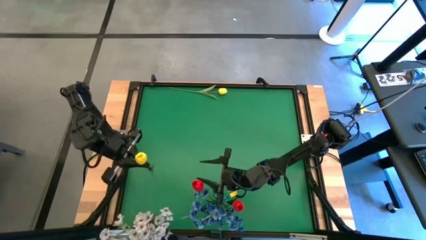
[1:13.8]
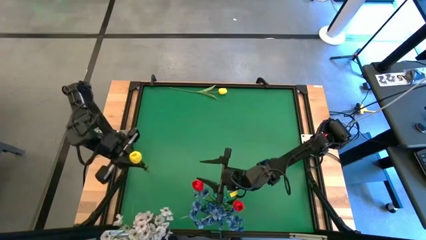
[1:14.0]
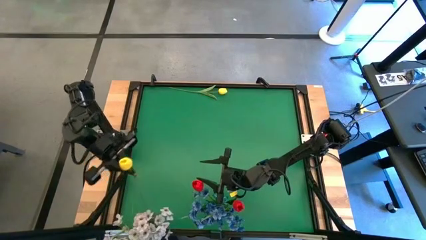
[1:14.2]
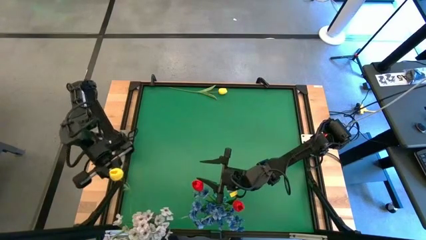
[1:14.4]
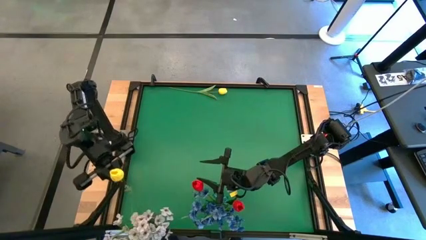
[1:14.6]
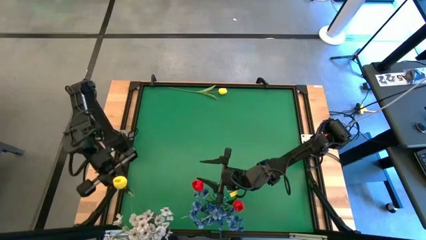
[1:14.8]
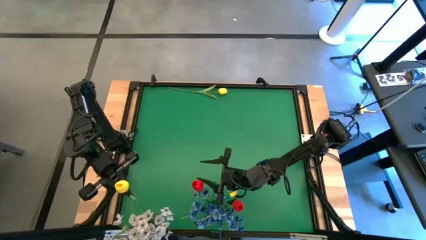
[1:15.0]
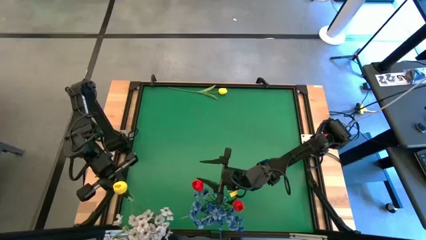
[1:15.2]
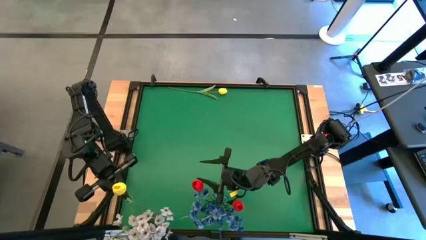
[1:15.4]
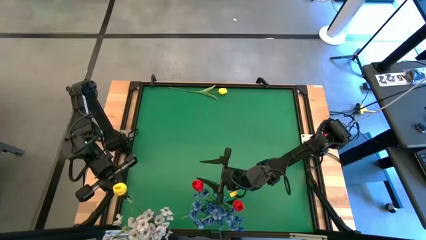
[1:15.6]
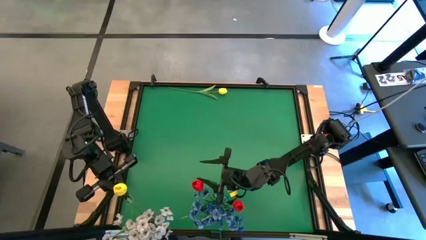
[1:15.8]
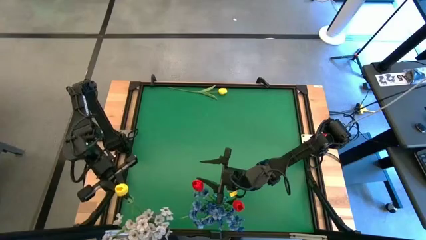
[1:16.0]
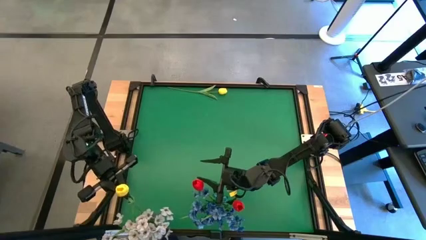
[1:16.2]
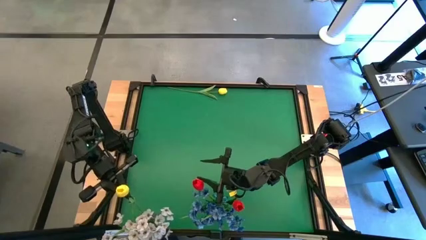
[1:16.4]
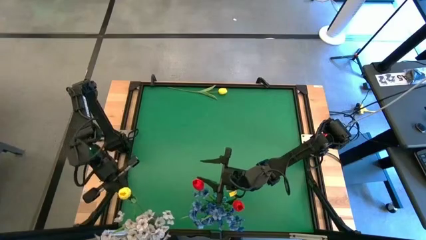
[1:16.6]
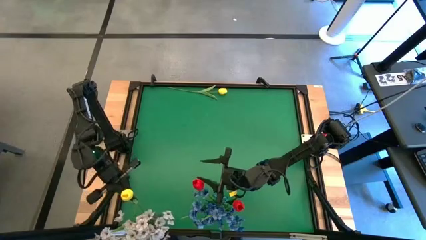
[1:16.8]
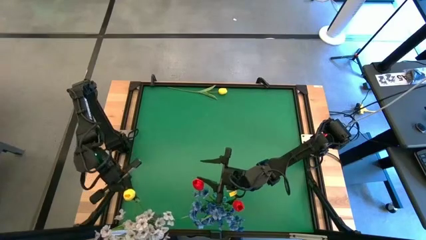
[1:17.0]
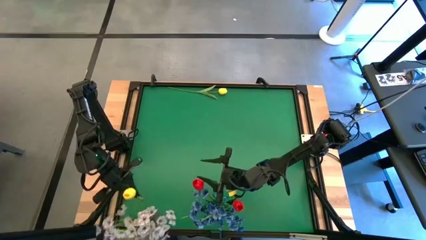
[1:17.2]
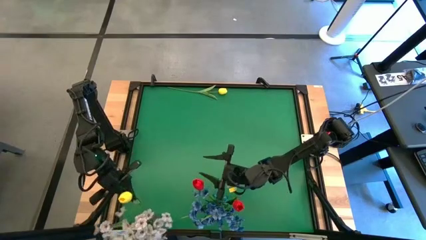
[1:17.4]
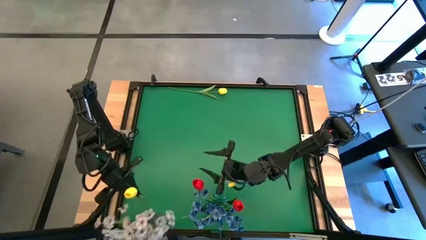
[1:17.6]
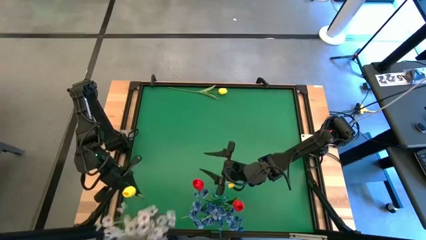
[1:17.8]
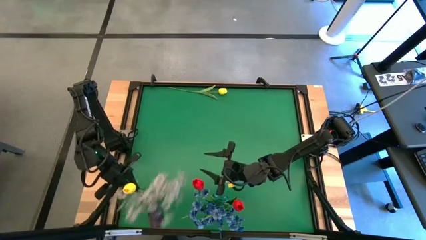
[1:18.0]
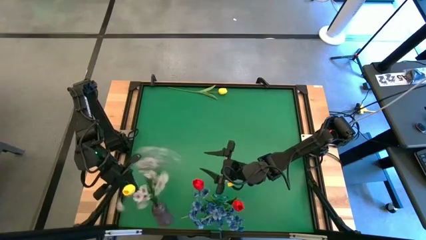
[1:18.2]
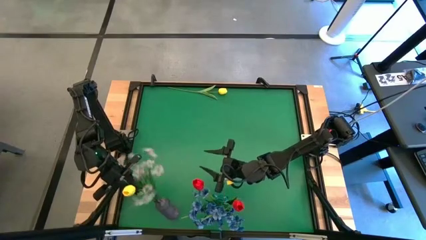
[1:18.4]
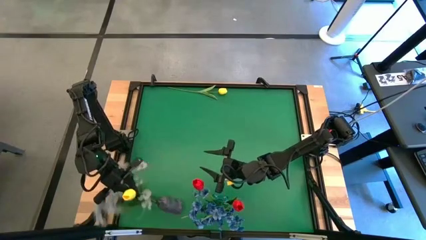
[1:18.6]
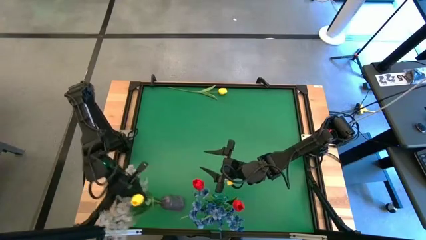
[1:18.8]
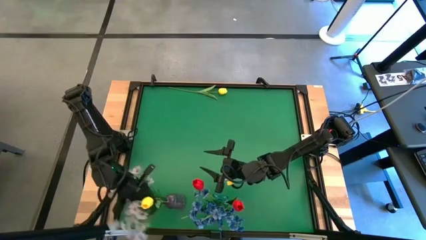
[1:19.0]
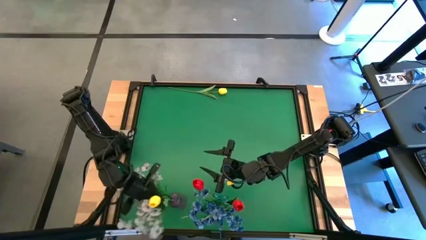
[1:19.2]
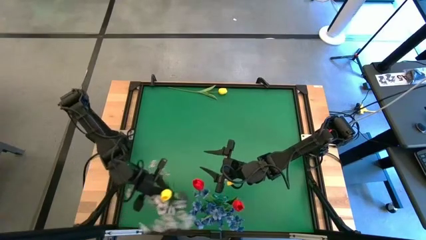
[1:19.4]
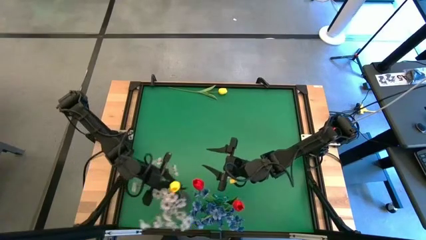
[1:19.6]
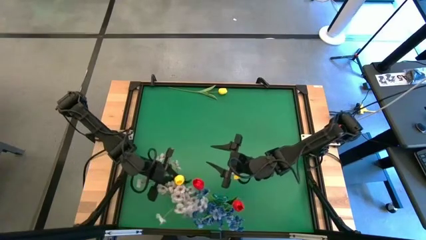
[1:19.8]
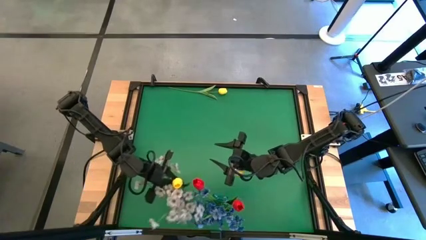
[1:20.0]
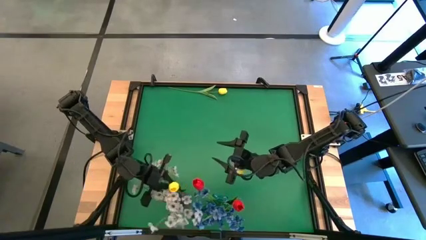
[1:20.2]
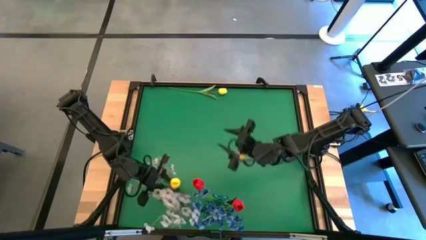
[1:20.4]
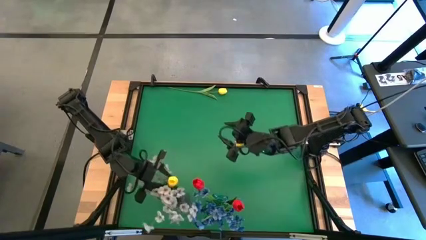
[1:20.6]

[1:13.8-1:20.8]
Task: Sort flowers into vase by color
Put the bottom yellow flower into the purple vase

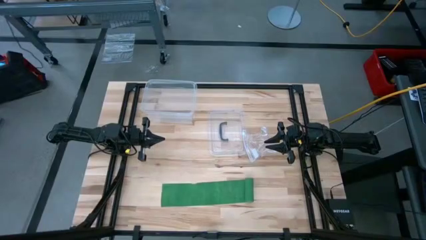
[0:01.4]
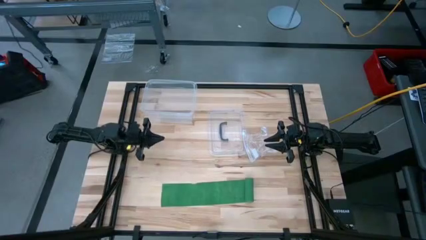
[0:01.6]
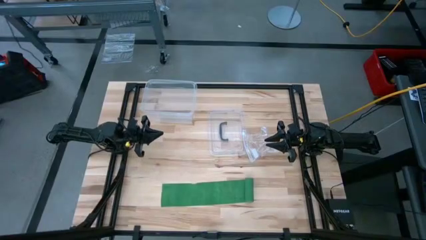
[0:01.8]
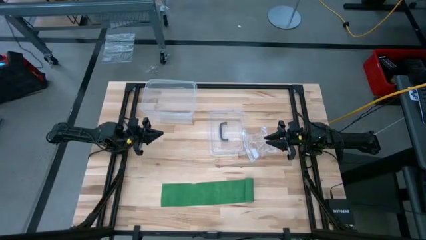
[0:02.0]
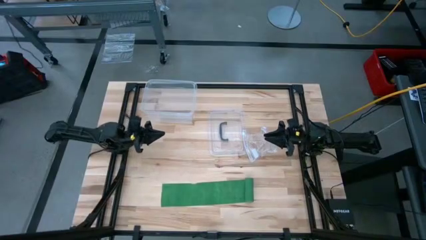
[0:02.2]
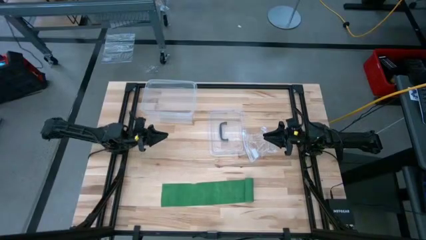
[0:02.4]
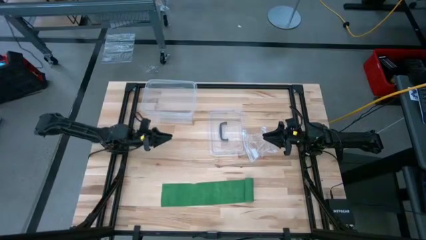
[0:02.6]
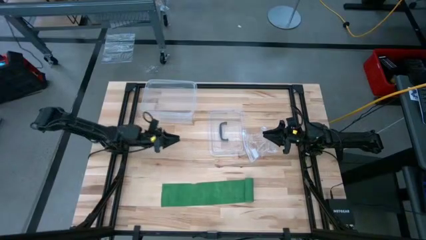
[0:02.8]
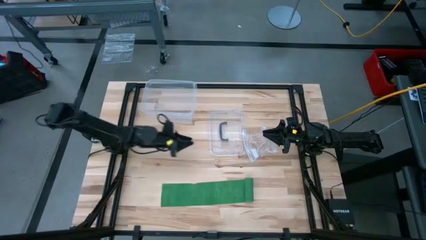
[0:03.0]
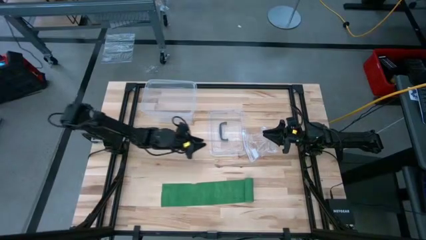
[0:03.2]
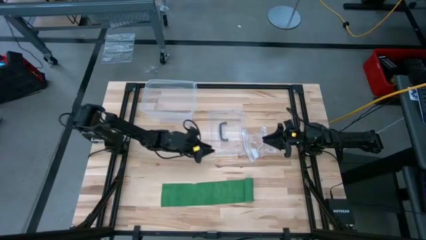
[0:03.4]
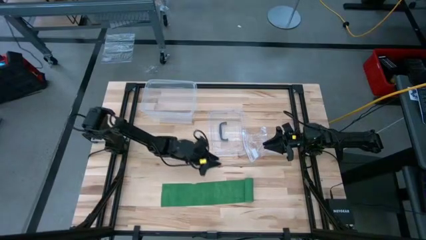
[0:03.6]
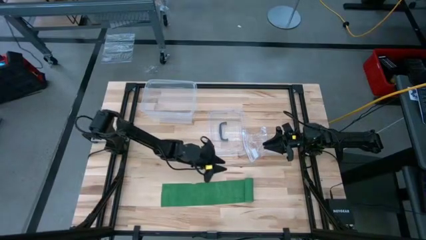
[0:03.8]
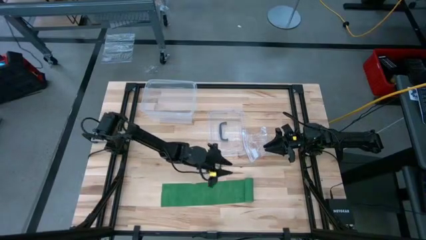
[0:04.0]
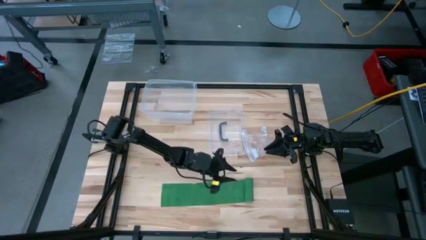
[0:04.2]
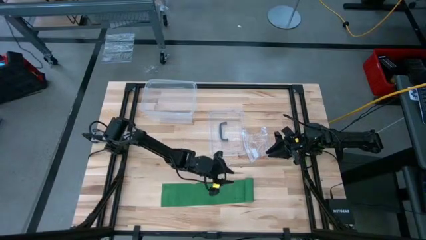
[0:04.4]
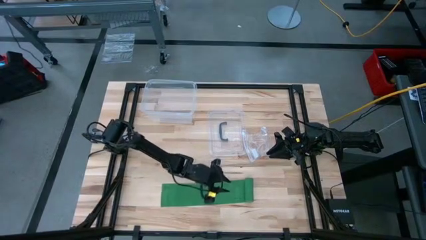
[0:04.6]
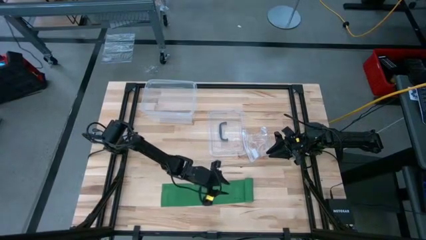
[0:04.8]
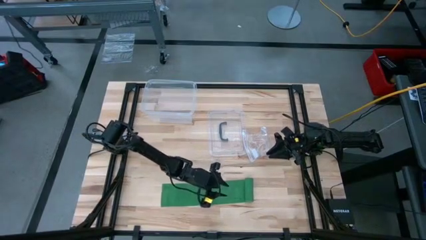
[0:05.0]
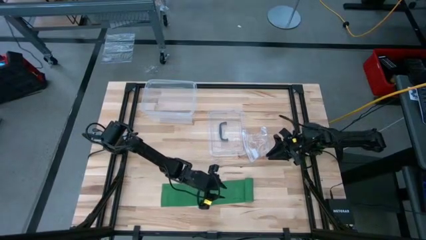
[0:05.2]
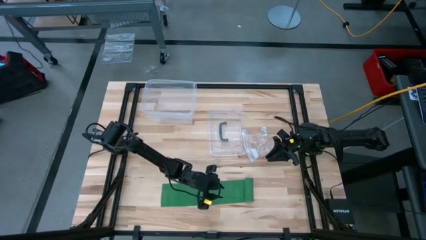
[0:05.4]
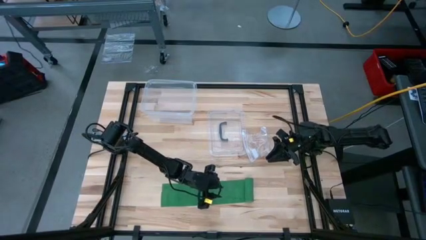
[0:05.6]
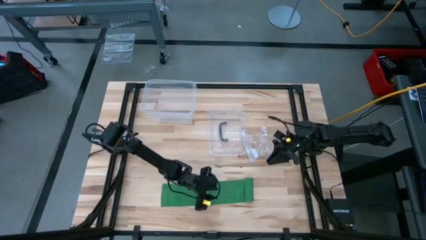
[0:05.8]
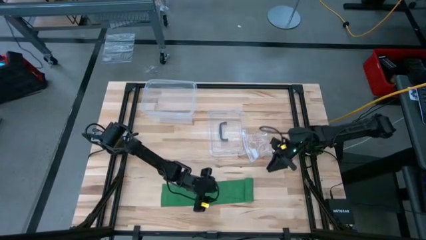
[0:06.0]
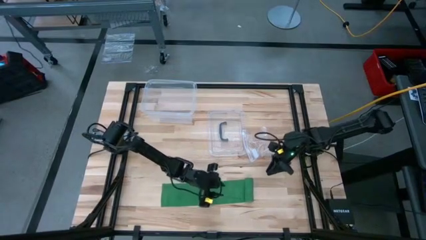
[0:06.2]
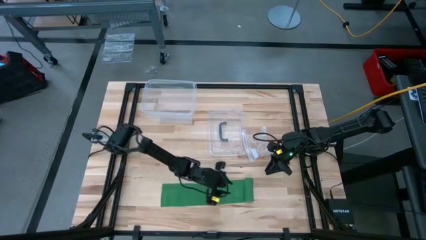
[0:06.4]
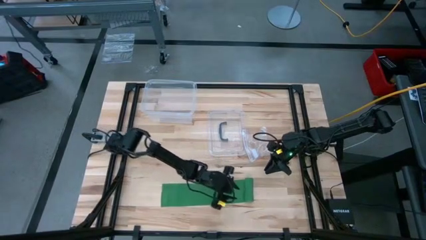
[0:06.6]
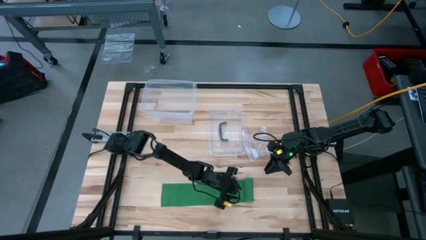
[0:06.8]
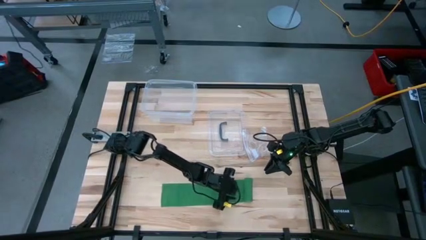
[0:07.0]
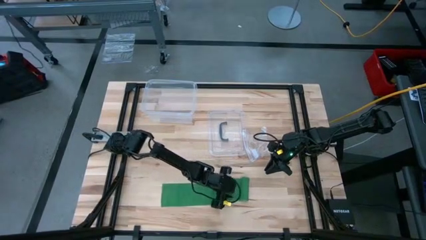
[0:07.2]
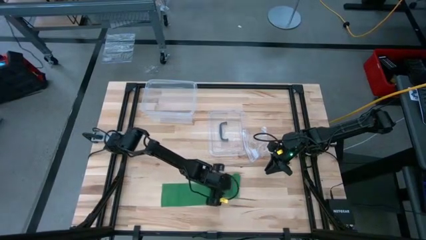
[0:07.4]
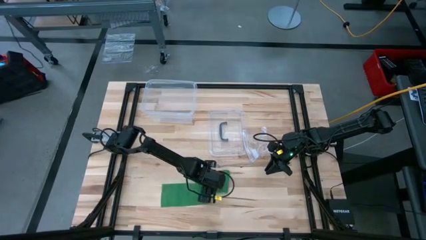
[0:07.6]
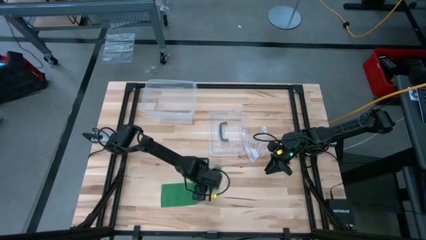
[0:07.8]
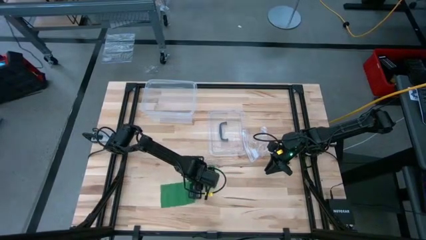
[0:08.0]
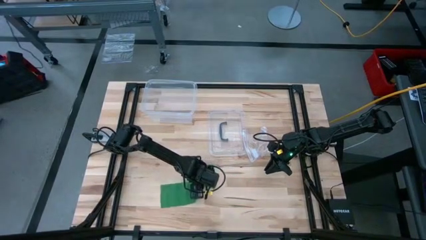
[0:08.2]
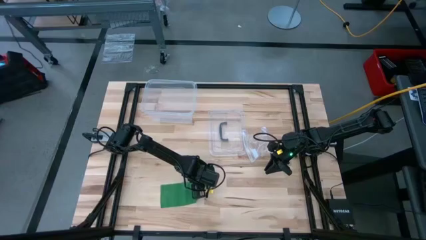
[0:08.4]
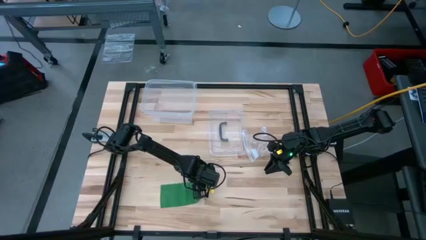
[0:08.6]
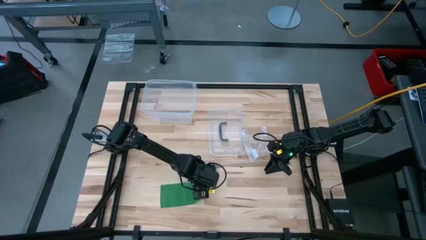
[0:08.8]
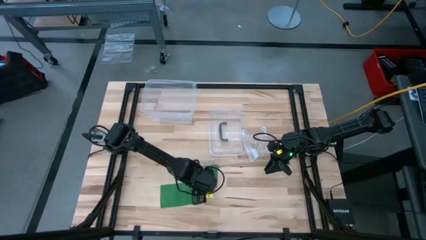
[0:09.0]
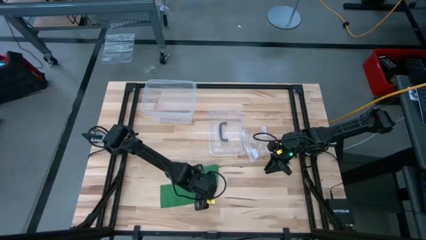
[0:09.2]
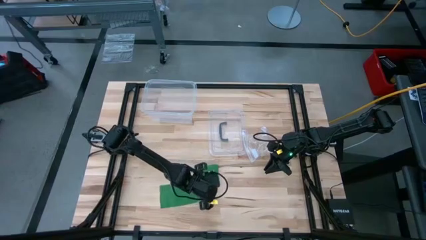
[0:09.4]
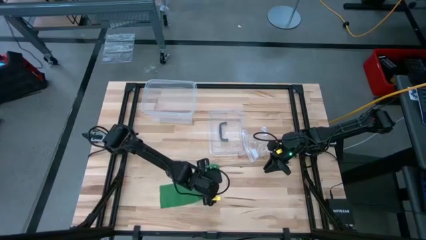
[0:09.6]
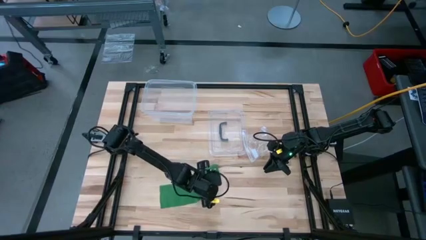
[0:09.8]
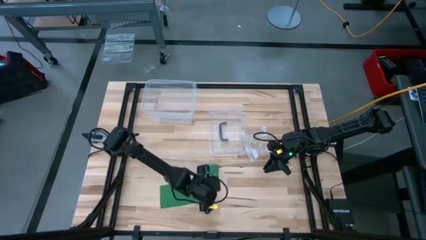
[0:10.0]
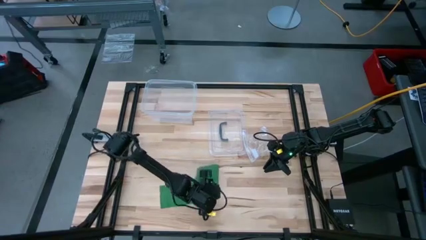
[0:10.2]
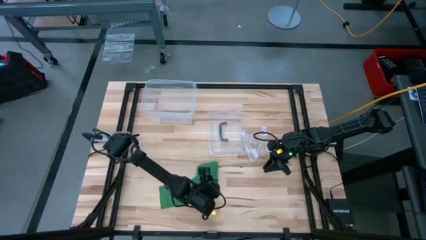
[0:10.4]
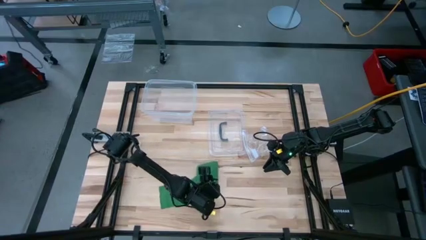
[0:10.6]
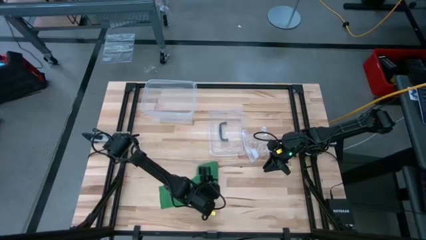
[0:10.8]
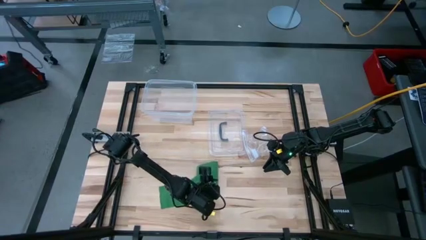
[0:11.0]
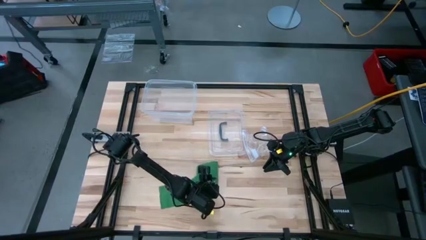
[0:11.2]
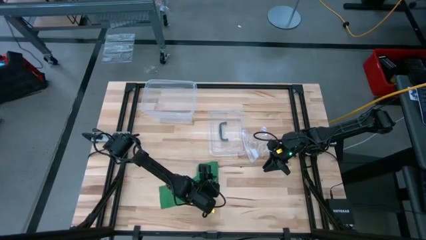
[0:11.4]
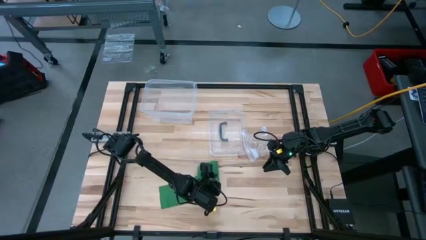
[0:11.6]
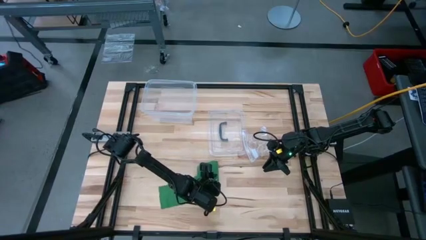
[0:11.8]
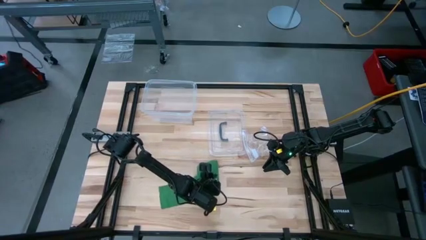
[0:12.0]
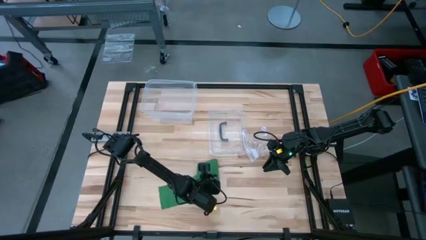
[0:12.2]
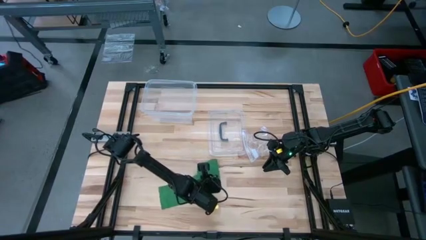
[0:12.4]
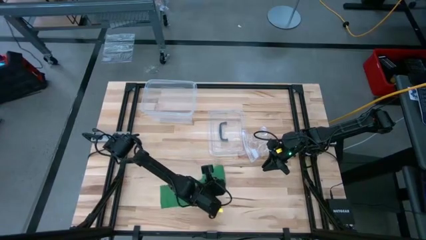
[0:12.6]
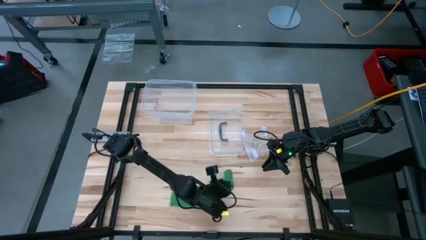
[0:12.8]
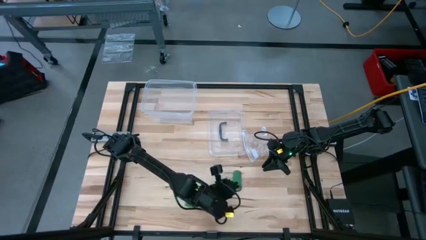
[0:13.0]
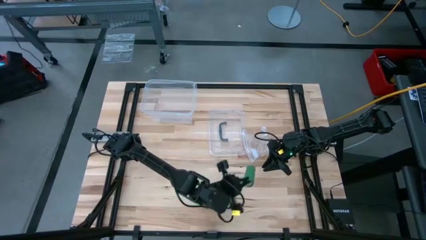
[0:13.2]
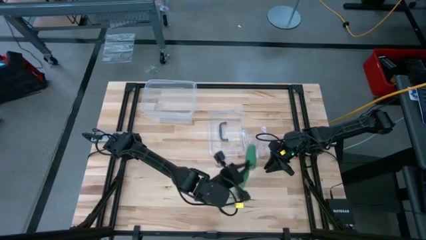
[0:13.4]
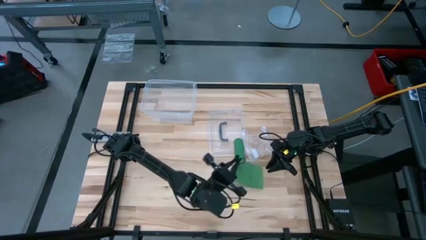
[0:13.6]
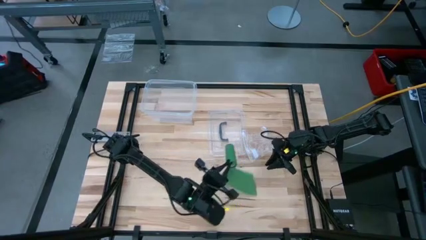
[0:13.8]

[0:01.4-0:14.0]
Task: Roll bandage
Roll the green bandage
